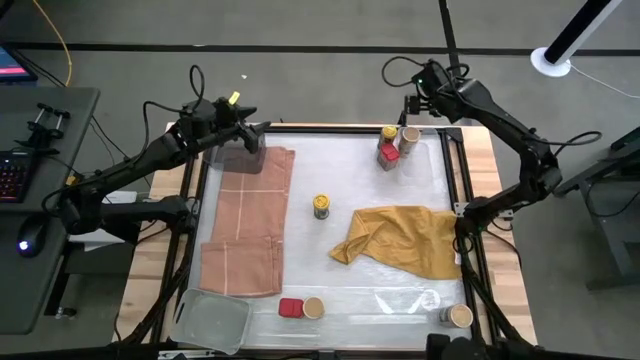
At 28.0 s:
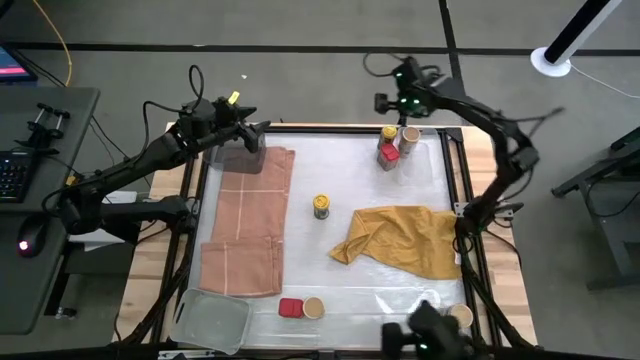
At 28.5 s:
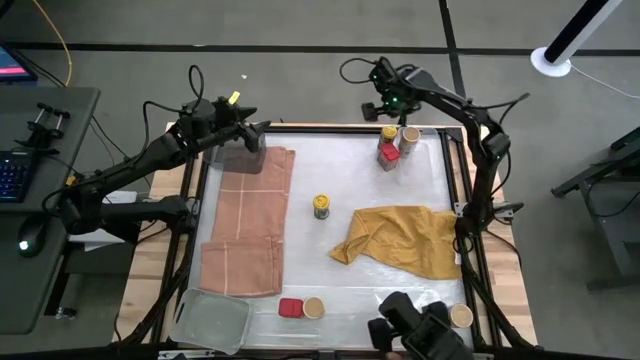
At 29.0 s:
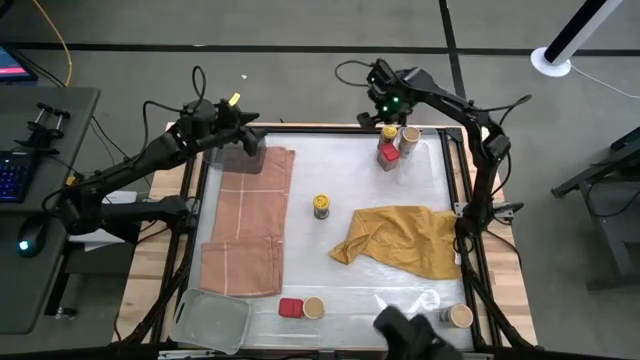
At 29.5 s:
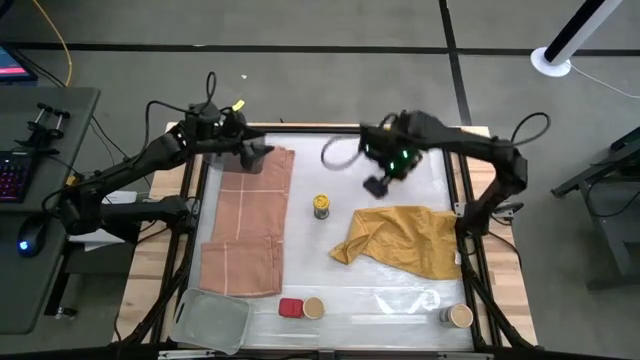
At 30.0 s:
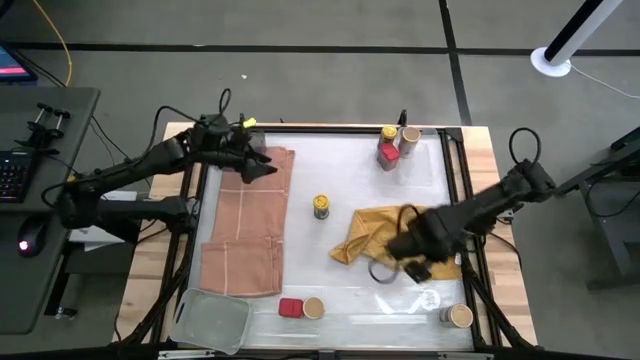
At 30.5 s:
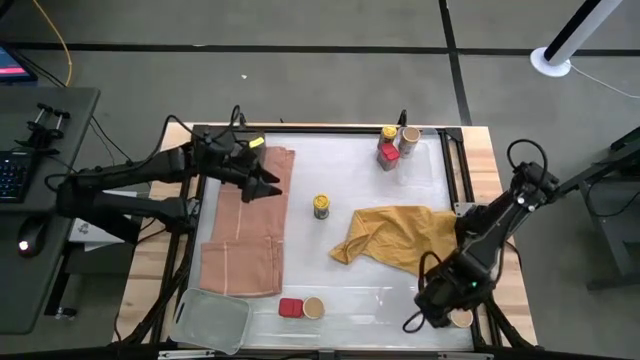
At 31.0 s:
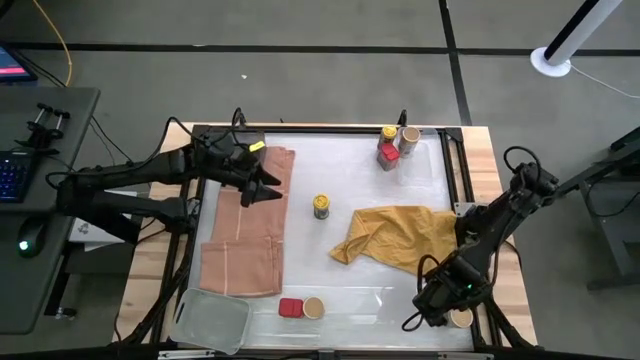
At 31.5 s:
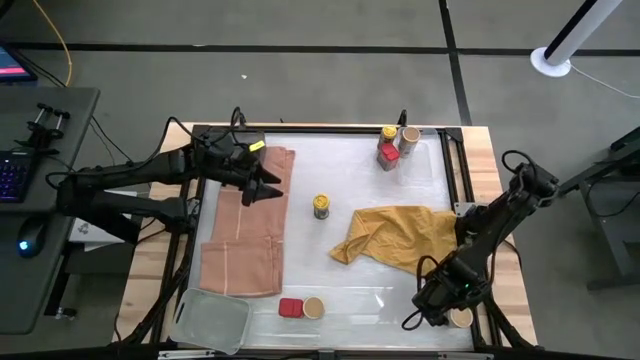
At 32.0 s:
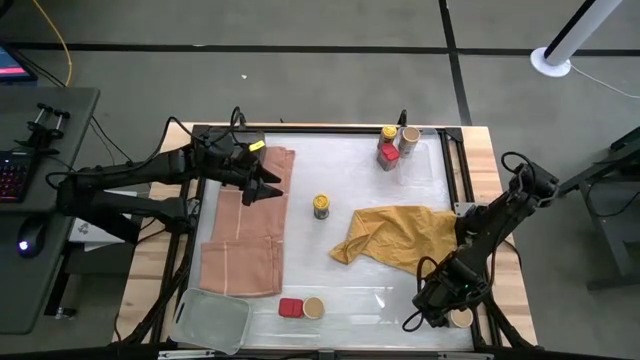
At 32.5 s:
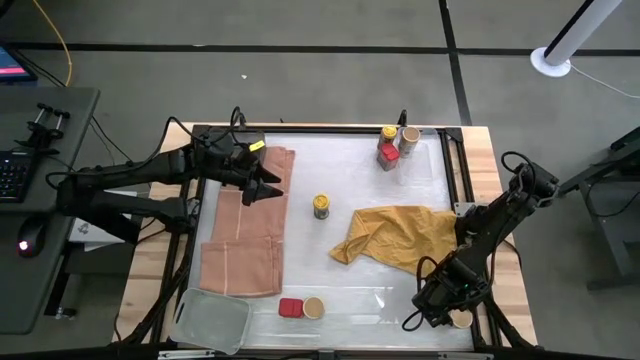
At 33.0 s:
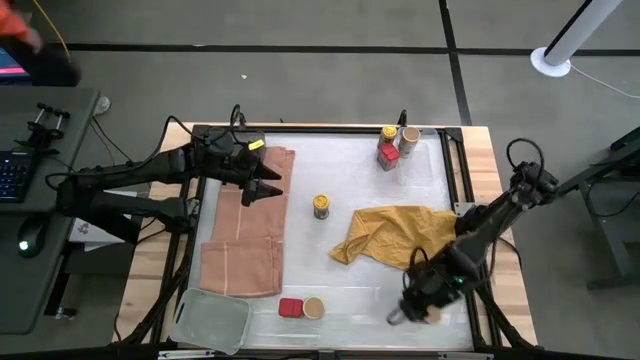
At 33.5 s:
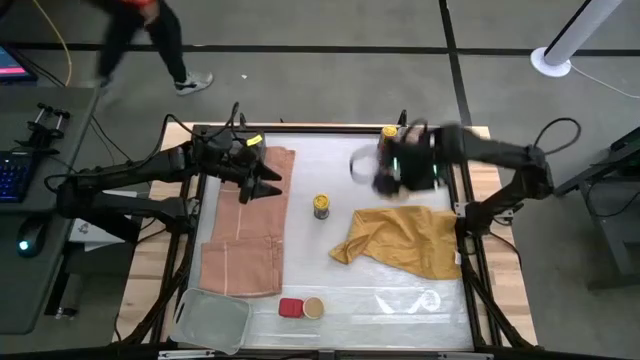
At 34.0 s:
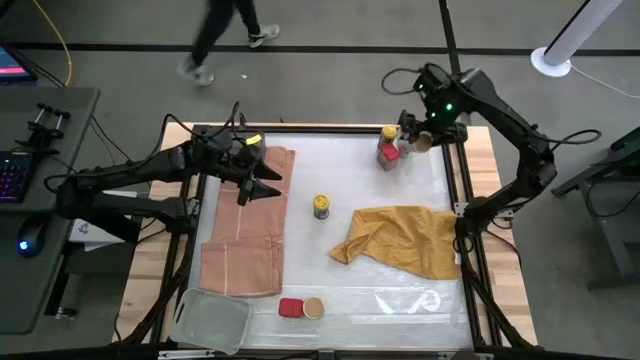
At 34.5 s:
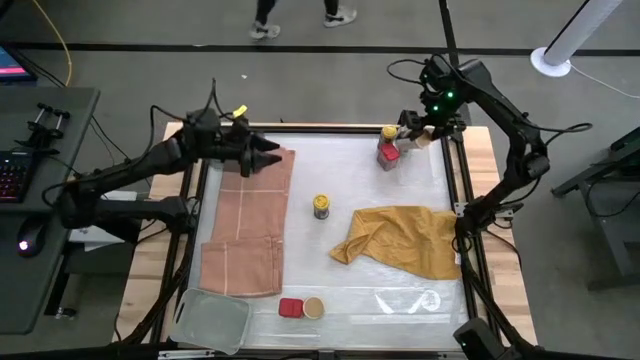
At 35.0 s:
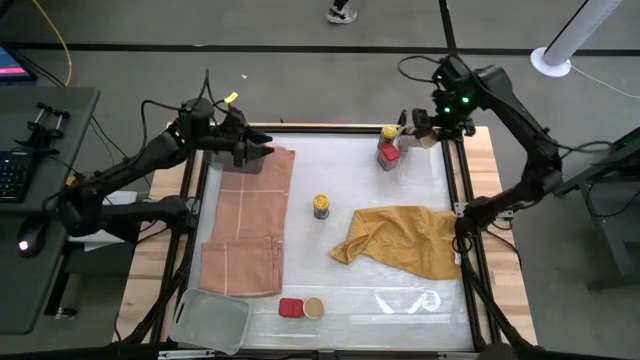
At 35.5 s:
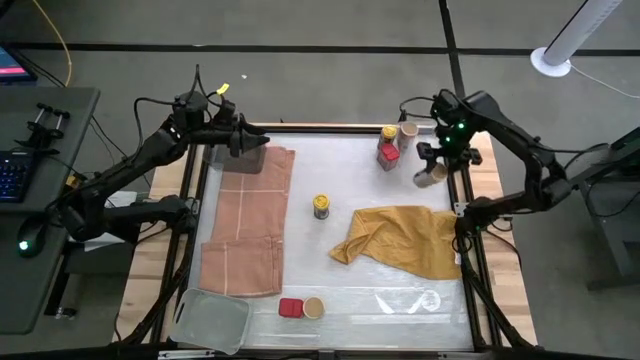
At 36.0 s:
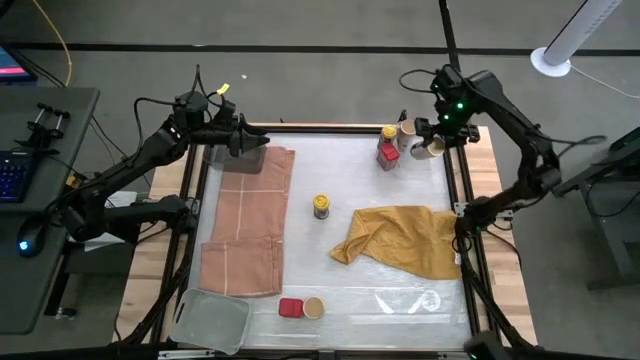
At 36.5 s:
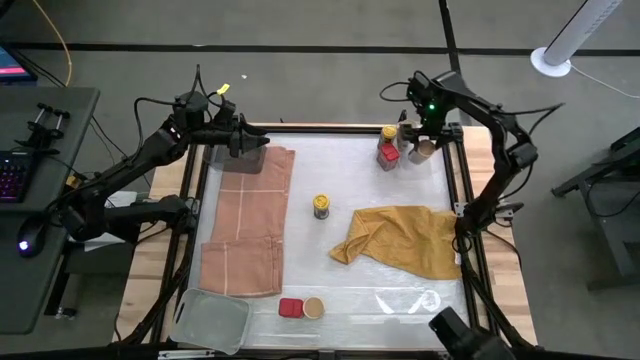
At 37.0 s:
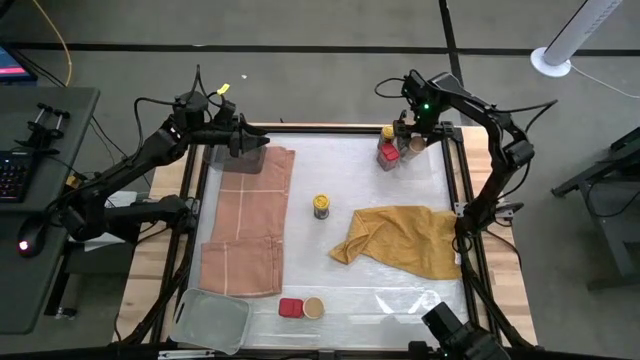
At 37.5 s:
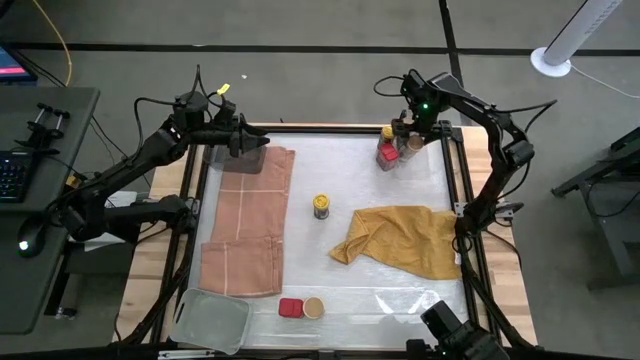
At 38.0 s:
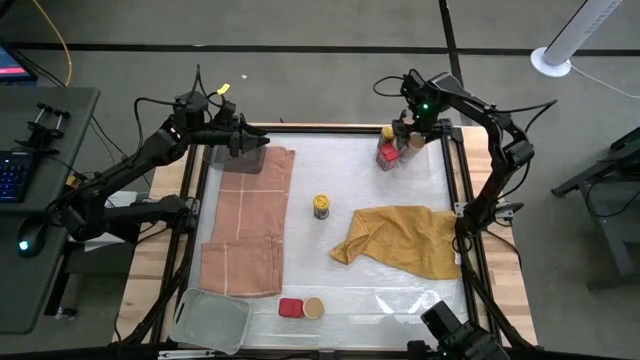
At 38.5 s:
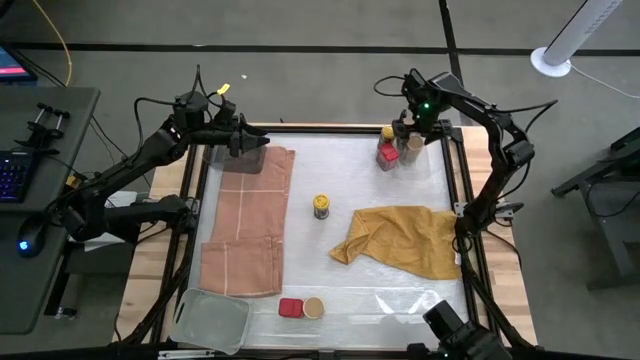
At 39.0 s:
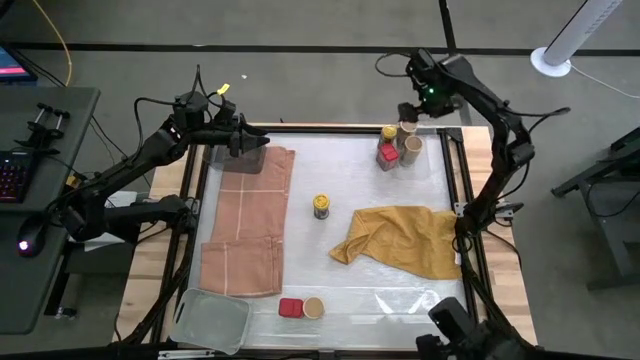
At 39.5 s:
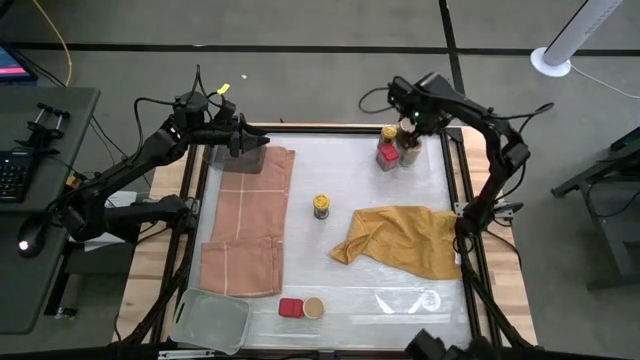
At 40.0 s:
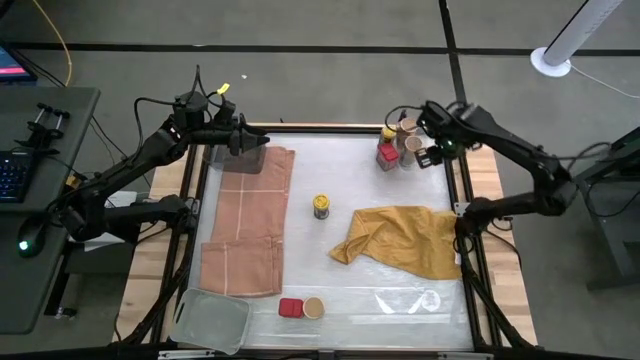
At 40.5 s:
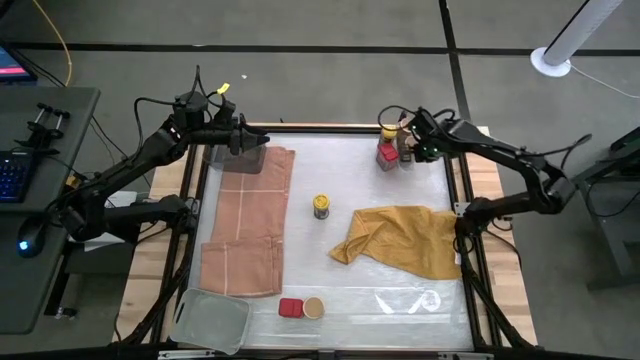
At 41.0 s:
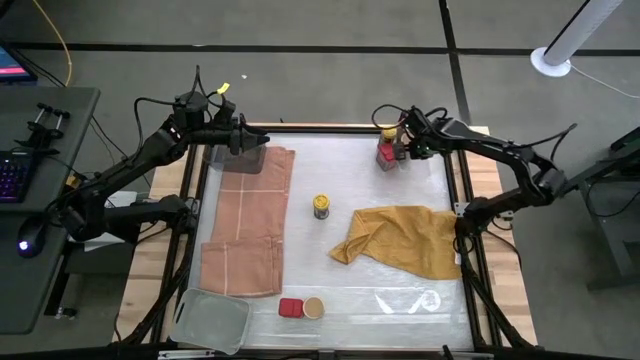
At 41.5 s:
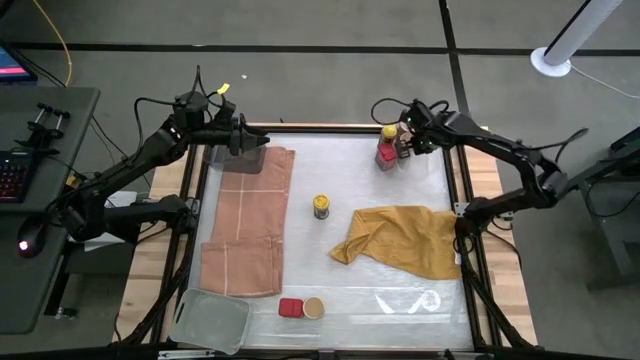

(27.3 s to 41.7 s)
Task: Sort spices by type
Put the right gold seasoning bottle into the transparent bin

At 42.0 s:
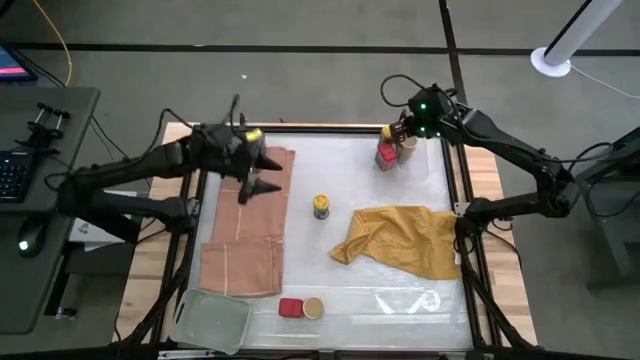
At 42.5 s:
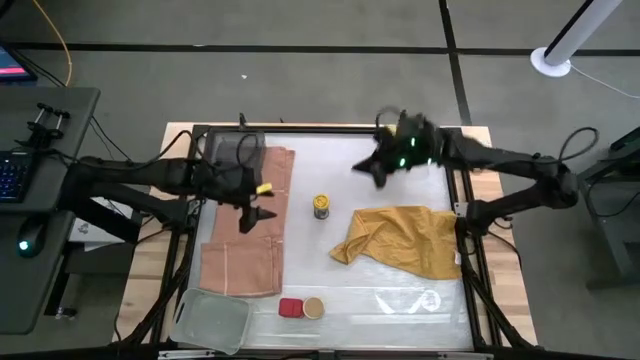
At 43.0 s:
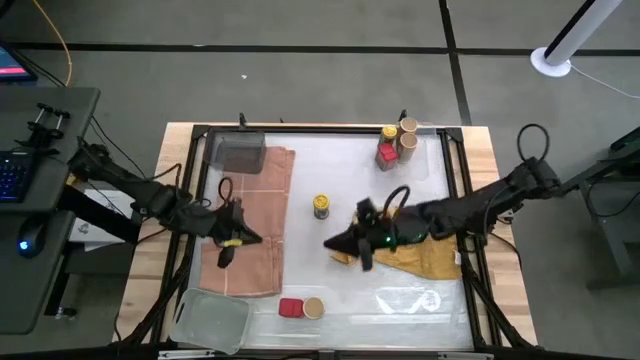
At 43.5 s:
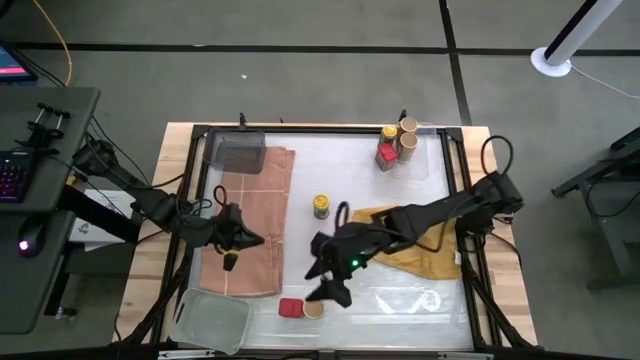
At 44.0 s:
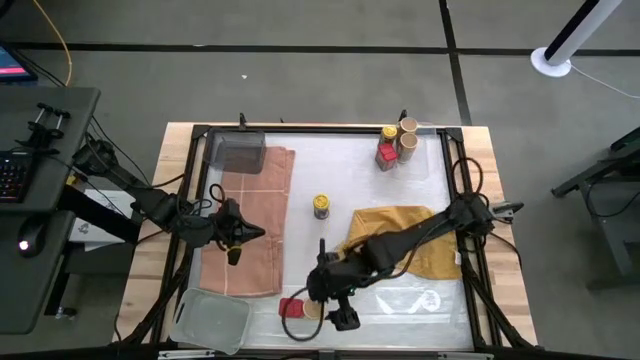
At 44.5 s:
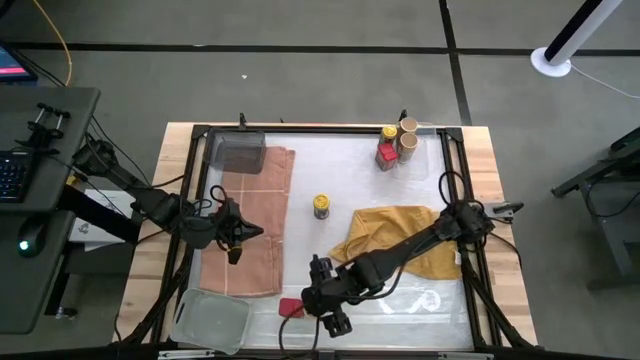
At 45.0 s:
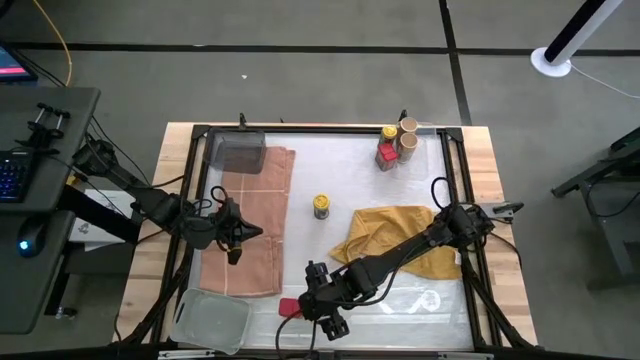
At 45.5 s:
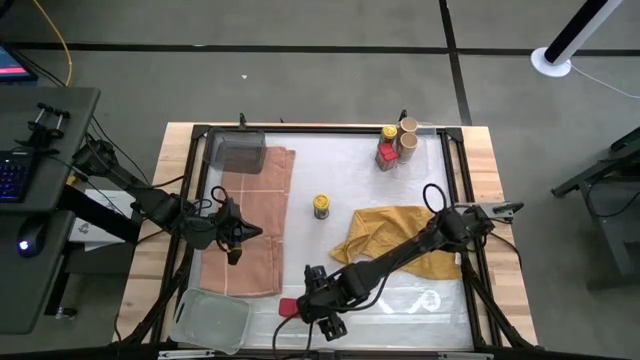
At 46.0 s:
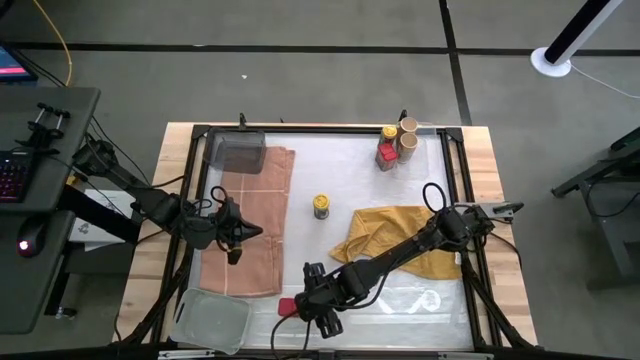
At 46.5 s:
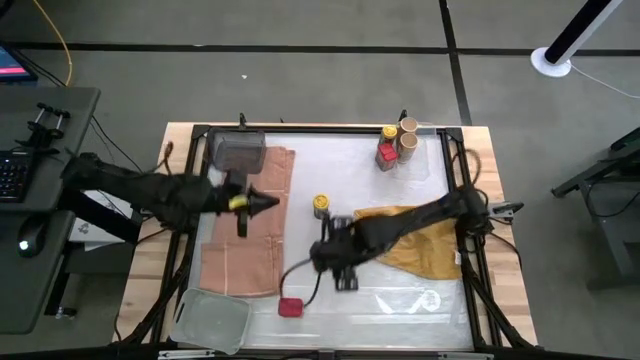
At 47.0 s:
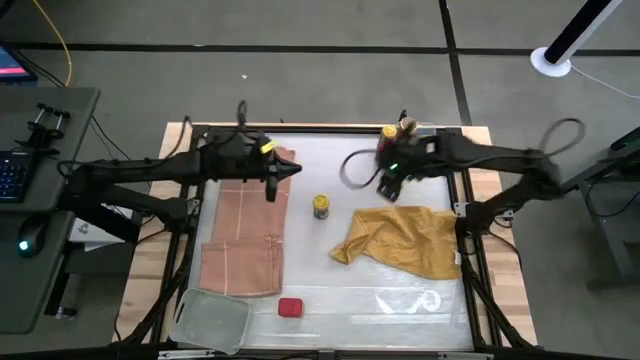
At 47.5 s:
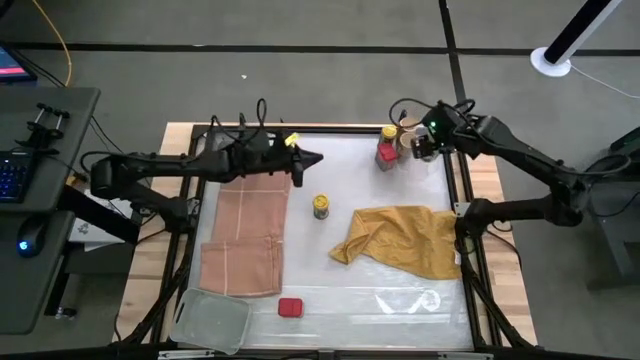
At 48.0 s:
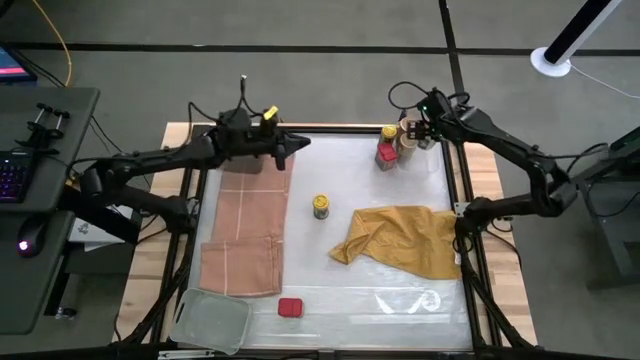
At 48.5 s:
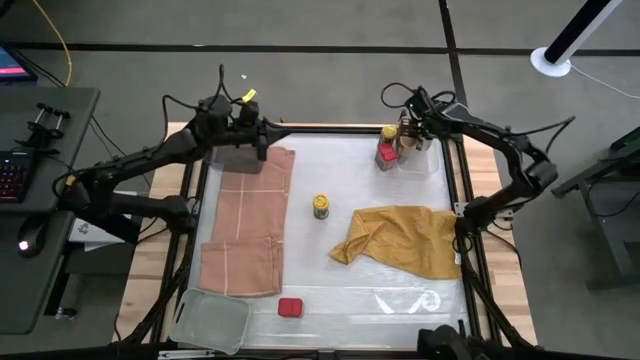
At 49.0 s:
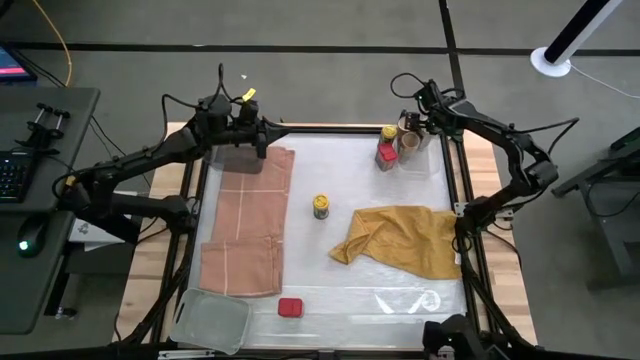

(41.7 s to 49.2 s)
Put the gold seasoning bottle into the transparent bin

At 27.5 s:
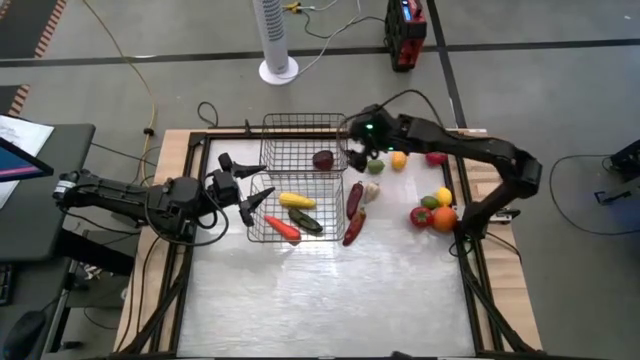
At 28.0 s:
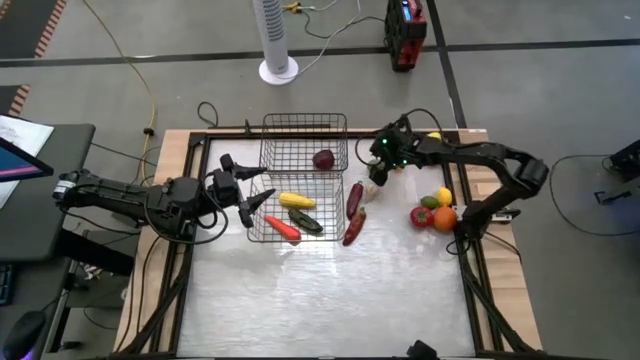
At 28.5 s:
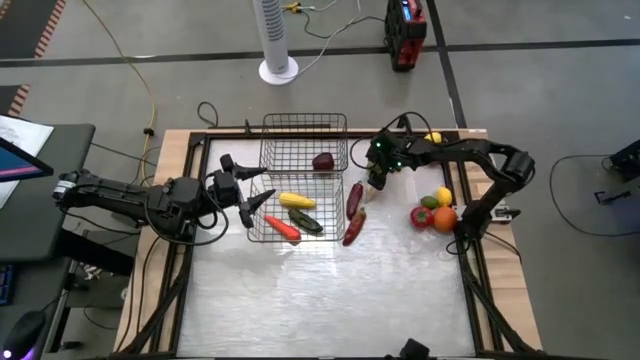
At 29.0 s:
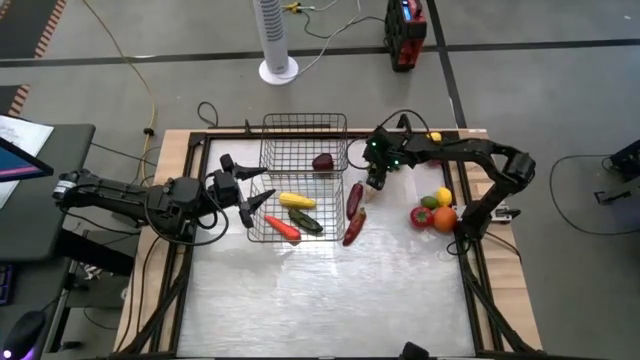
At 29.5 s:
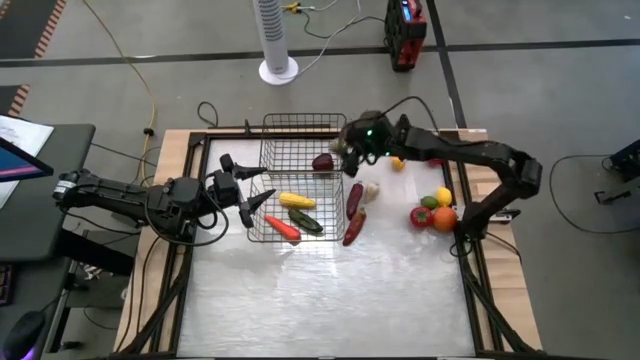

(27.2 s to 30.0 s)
Task: Sort produce into baskets
Put the left lime into the top wire basket
